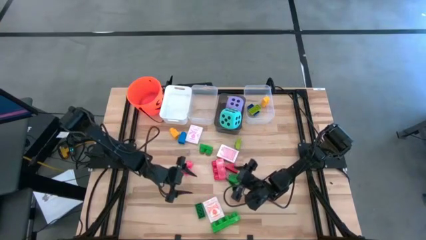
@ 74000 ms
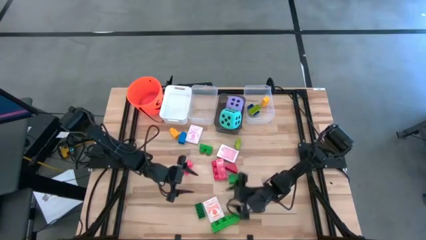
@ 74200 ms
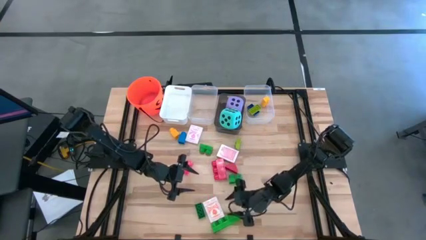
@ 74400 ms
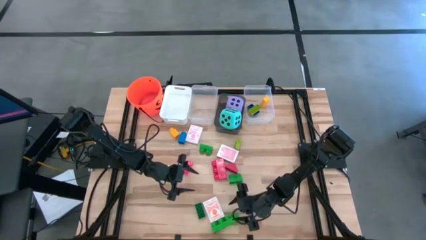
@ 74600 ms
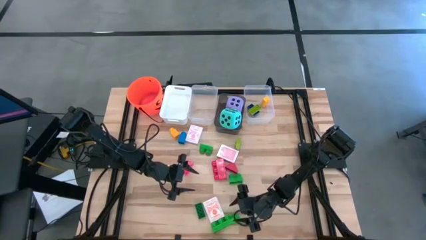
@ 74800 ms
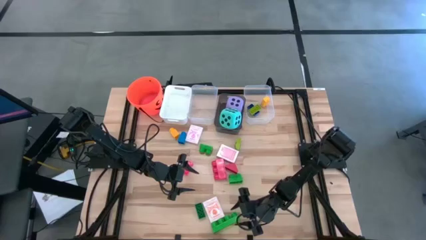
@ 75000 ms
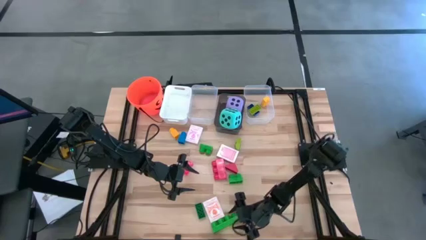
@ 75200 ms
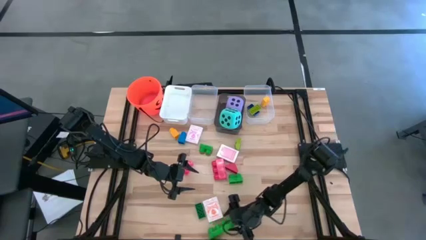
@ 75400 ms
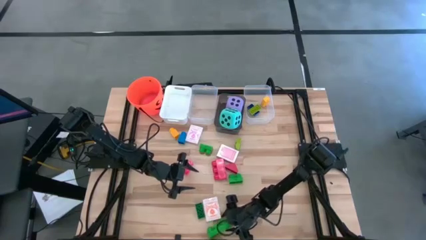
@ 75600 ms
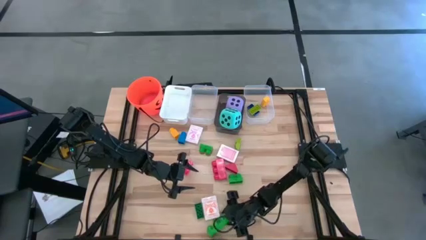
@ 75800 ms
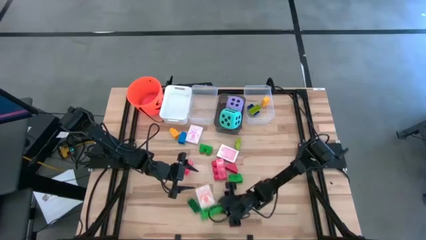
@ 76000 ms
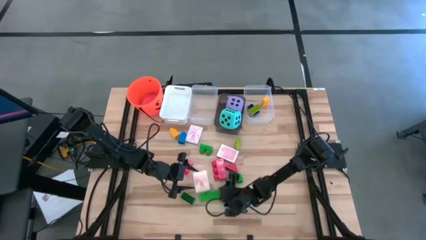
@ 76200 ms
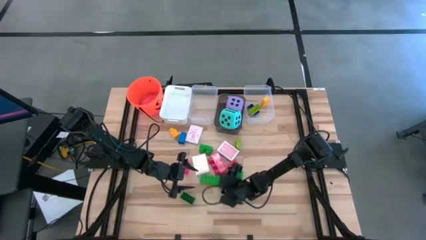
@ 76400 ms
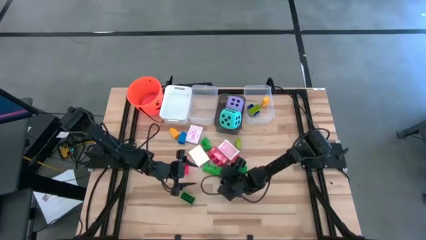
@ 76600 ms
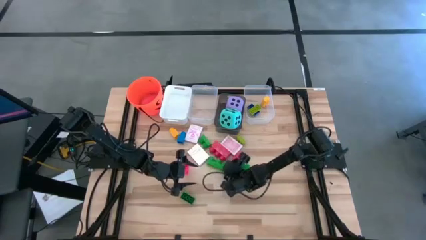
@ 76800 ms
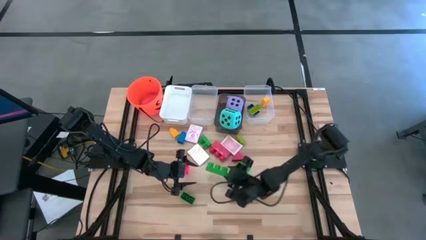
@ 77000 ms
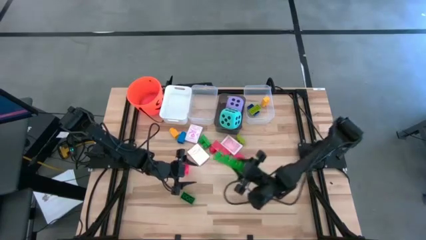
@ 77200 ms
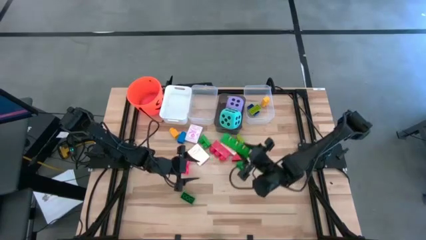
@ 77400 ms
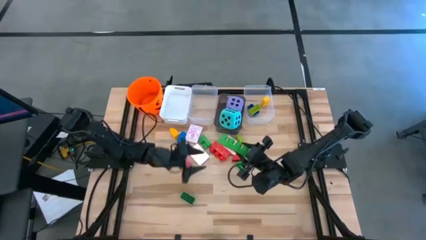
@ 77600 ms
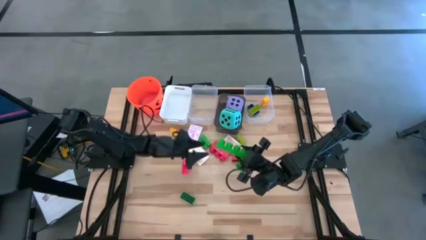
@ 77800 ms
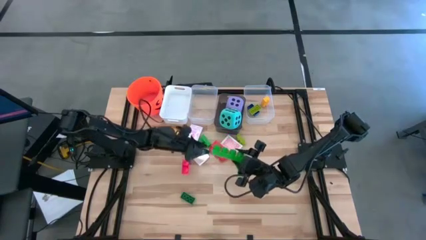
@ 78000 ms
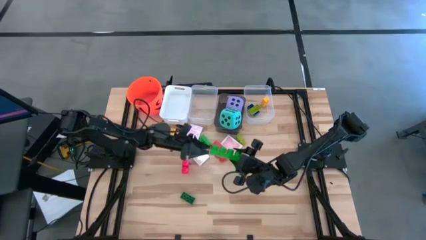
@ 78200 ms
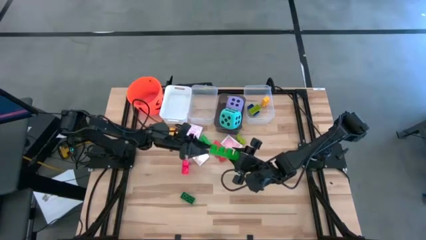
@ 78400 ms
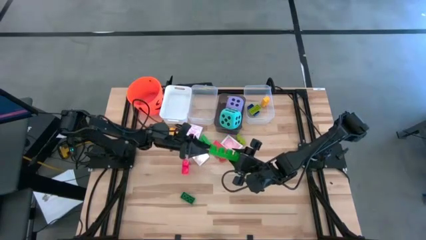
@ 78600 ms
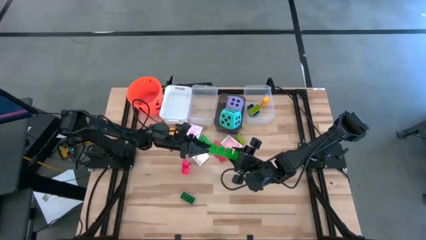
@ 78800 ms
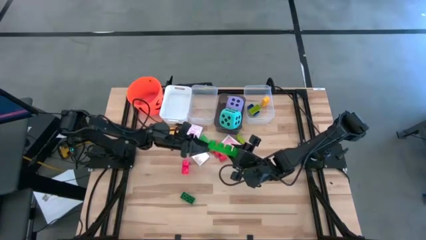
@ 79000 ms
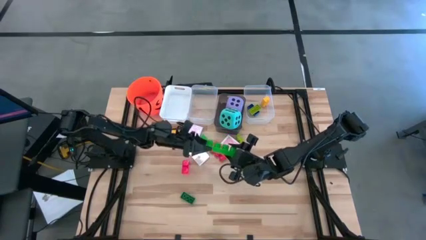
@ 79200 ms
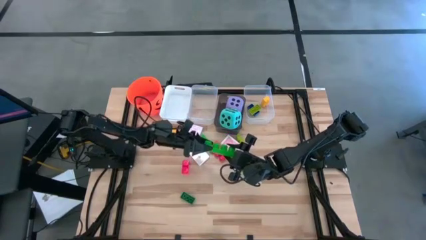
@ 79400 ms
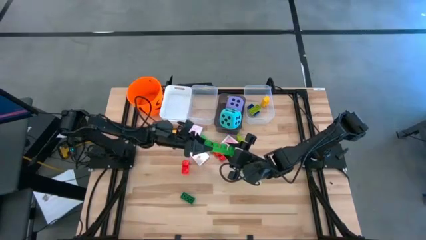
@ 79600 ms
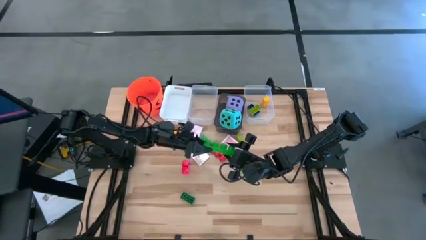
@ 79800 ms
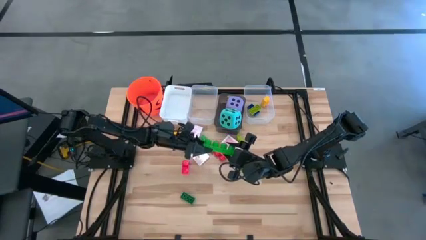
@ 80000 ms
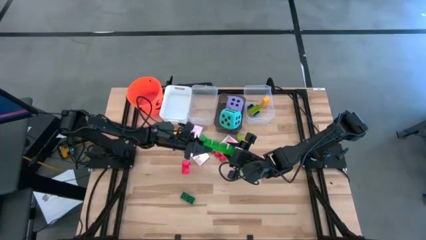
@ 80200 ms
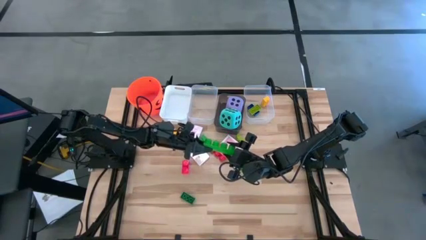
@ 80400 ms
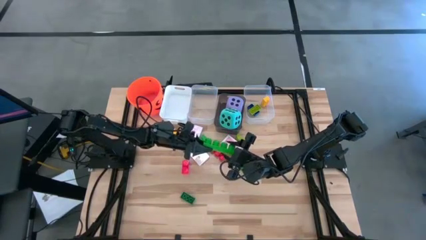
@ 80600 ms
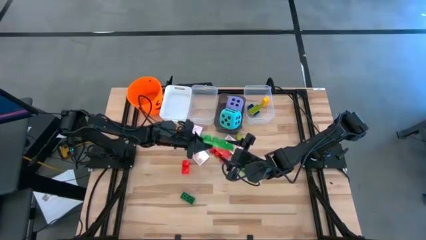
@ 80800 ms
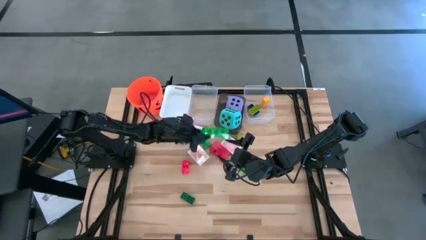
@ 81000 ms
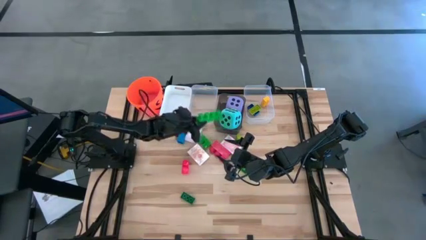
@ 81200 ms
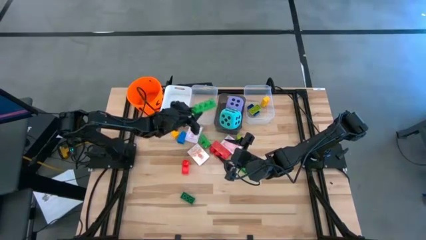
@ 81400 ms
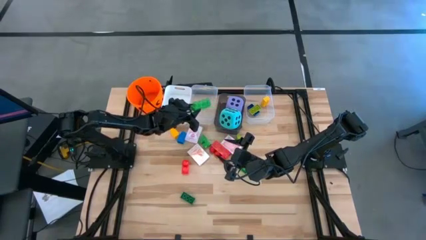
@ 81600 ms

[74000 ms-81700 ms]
Task: Pick & Place Toys
Put the bottom large green game piece into the left transparent bin

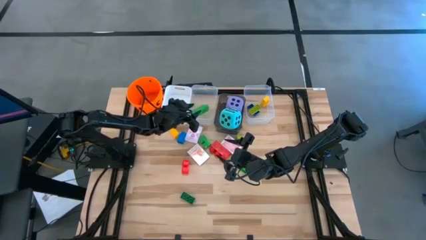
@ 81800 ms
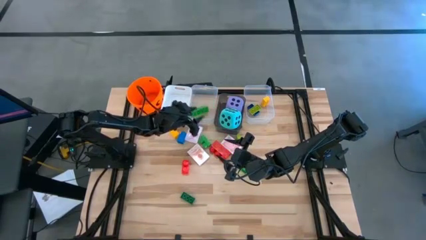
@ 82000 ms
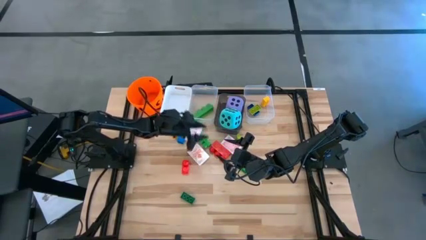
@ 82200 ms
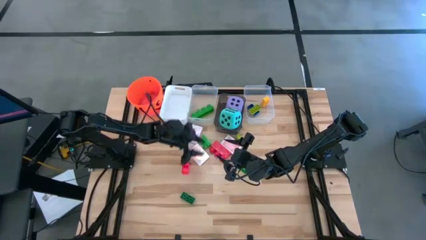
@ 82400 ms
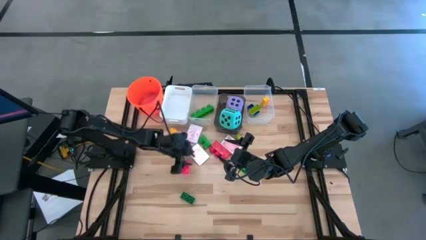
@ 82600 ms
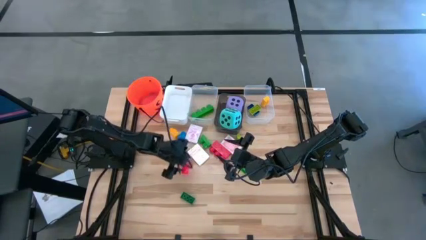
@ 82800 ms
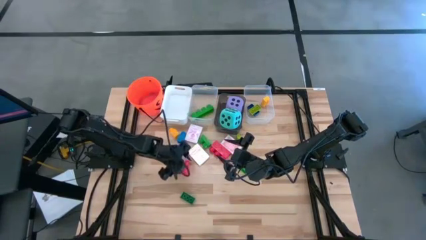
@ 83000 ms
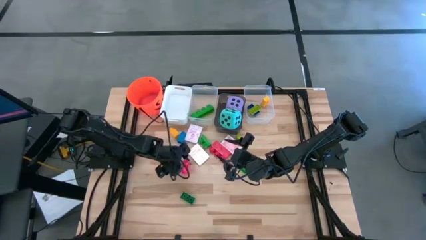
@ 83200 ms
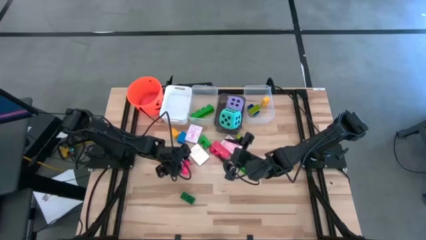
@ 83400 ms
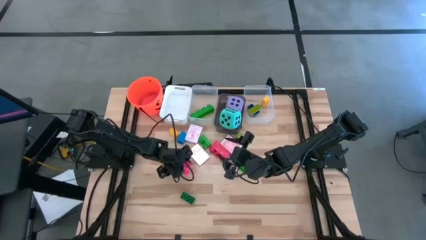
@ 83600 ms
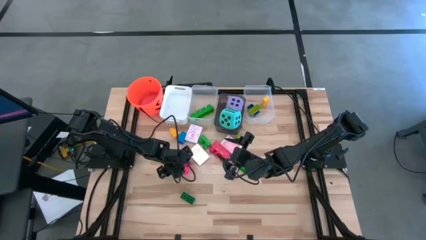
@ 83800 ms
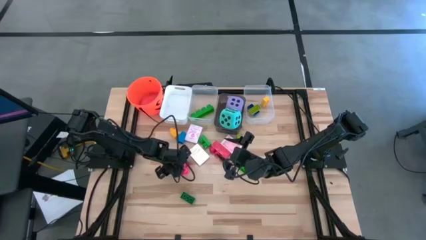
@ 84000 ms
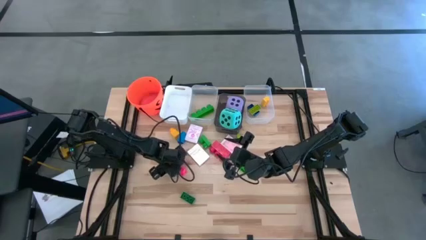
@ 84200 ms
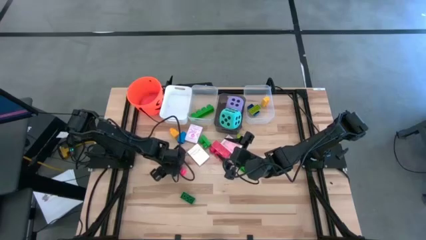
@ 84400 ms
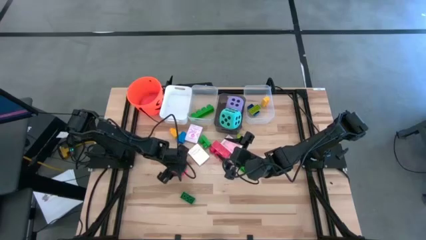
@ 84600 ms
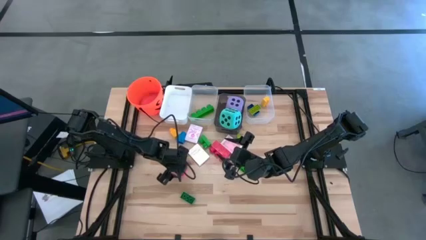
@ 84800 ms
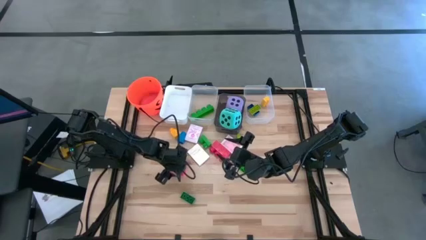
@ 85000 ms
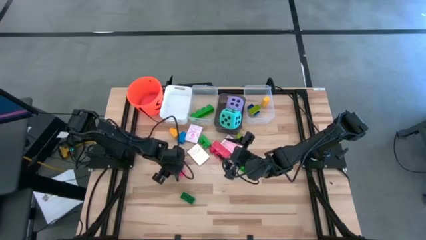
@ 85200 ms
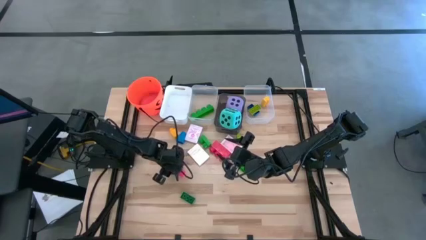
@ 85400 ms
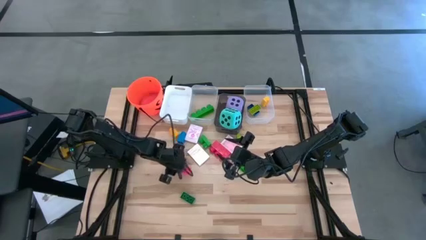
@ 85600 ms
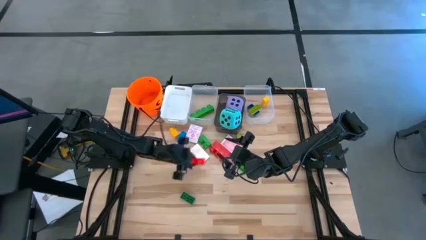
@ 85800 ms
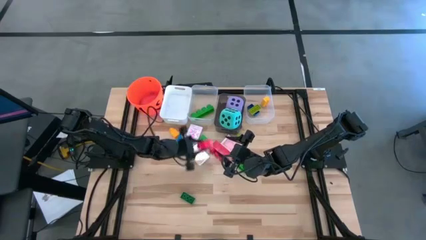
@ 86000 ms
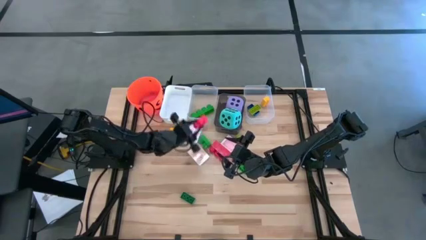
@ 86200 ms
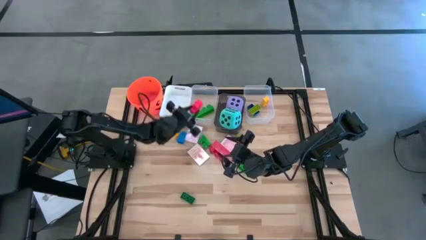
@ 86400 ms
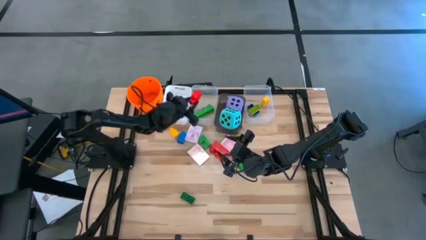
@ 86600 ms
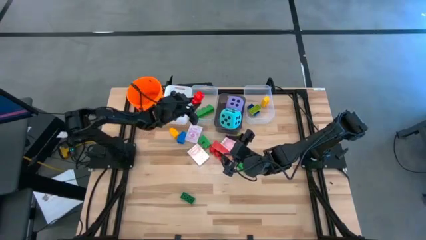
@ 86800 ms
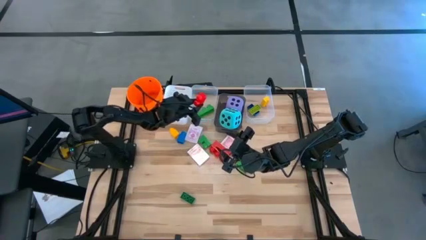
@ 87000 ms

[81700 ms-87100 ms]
Put the bottom large red game piece into the left transparent bin

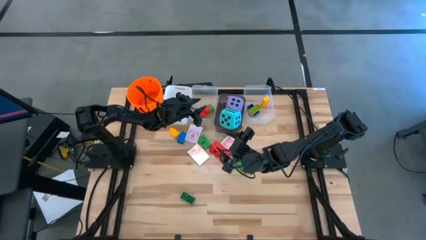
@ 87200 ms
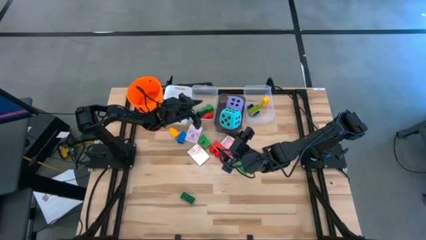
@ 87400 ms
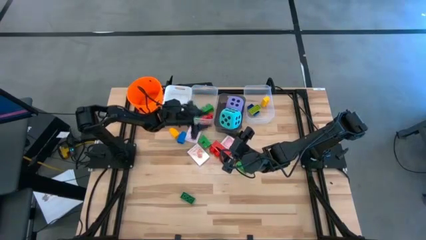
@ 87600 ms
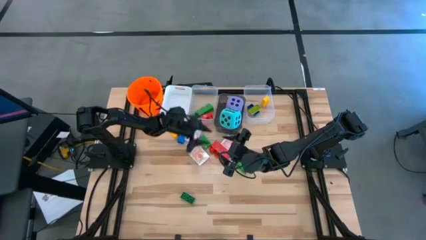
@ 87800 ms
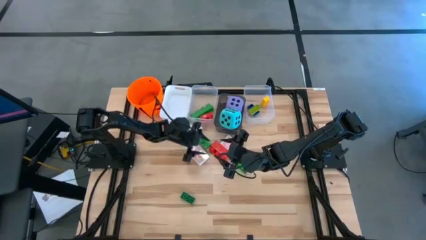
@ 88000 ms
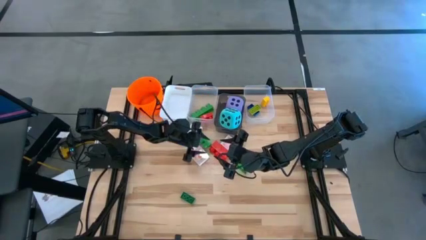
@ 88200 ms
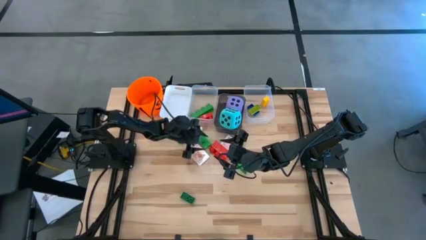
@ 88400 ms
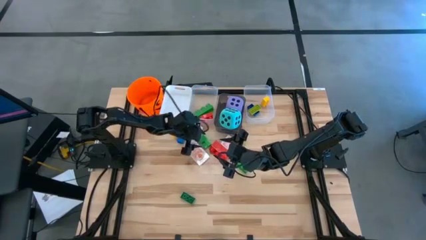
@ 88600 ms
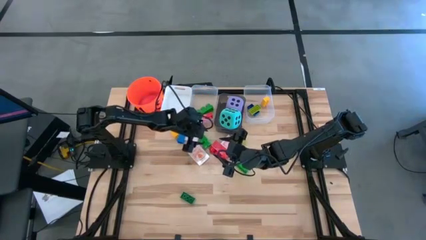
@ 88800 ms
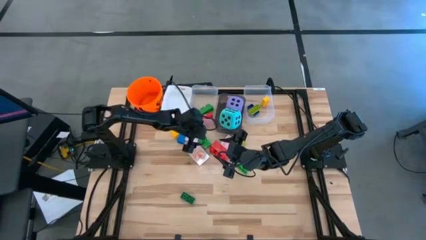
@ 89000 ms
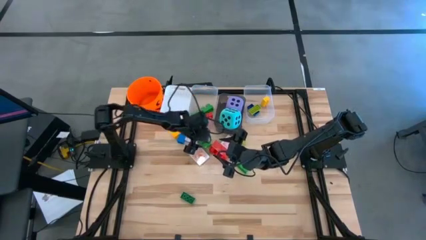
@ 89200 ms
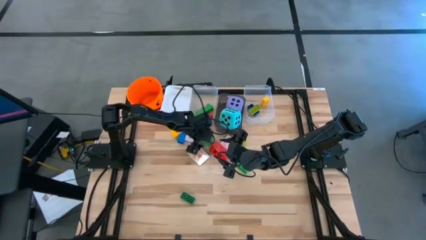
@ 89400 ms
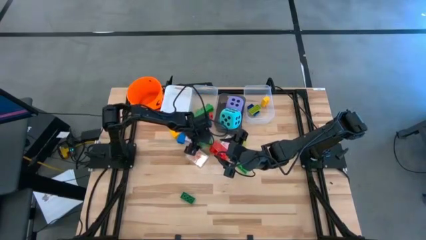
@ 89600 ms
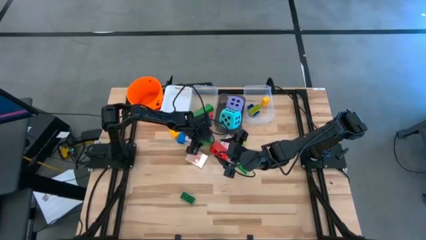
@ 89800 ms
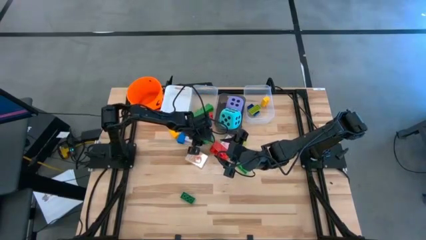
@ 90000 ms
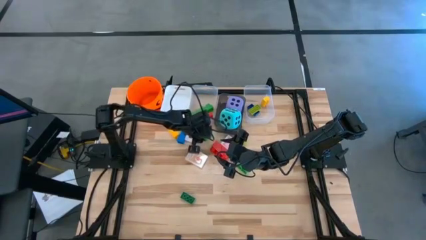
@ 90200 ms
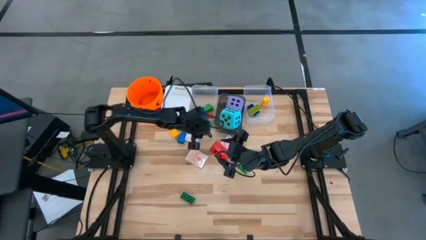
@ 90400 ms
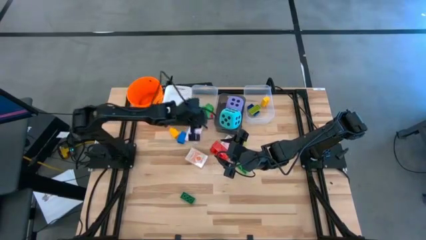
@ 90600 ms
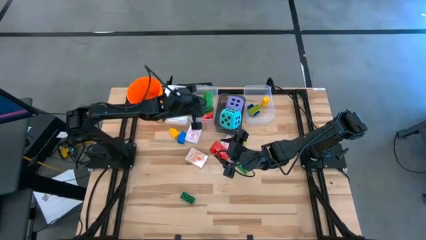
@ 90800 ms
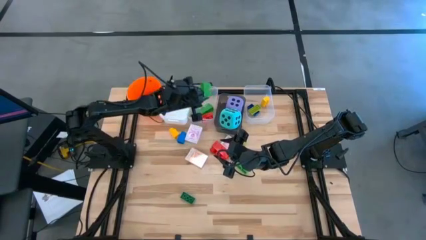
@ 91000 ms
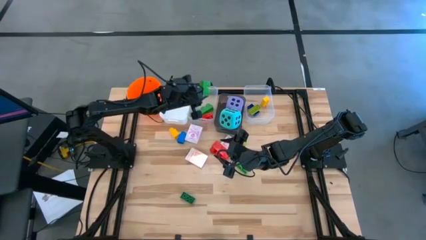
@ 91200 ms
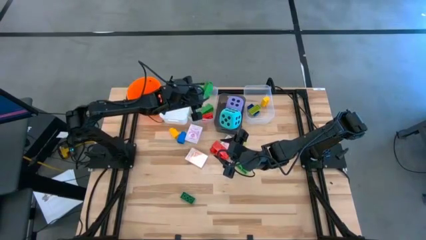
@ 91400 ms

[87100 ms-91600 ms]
Put the top large green game piece into the left transparent bin
